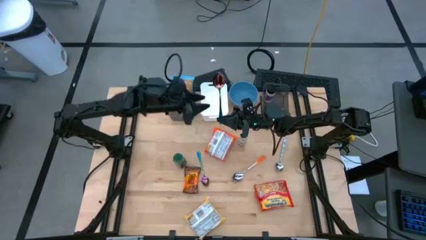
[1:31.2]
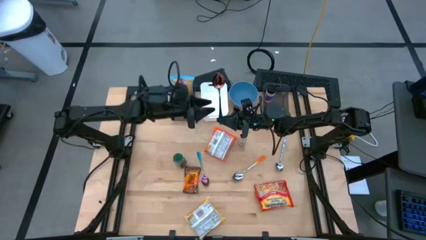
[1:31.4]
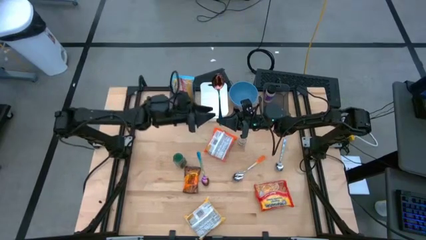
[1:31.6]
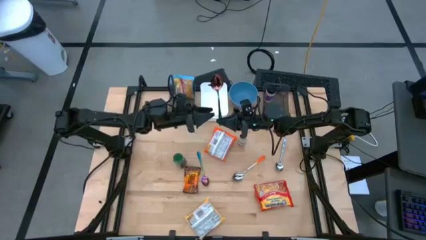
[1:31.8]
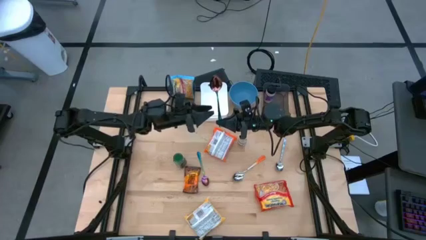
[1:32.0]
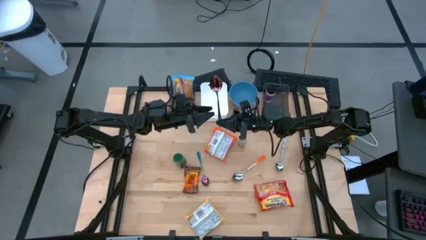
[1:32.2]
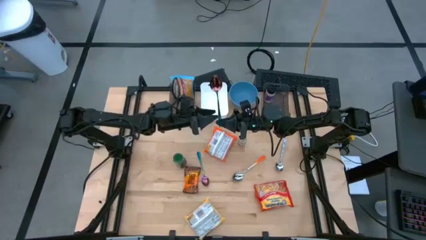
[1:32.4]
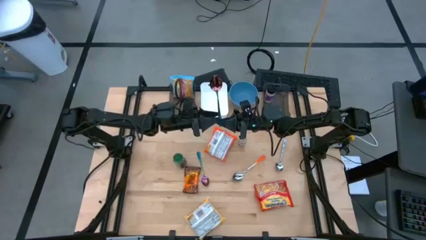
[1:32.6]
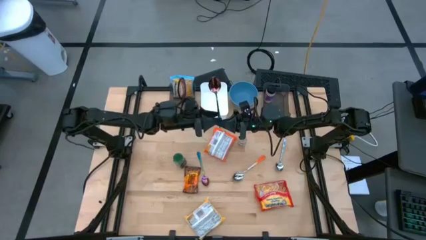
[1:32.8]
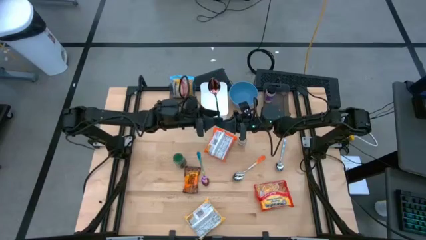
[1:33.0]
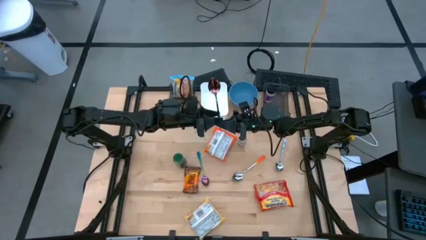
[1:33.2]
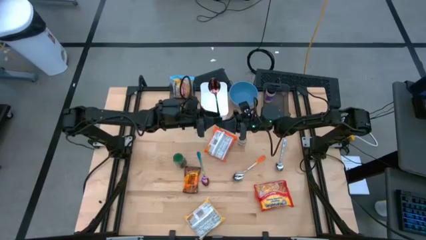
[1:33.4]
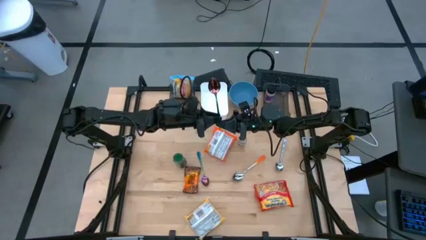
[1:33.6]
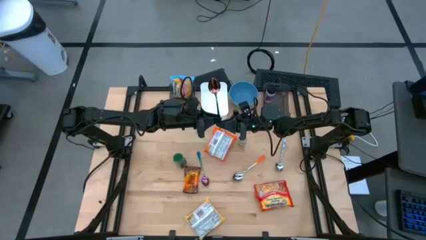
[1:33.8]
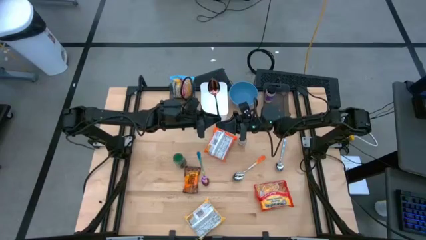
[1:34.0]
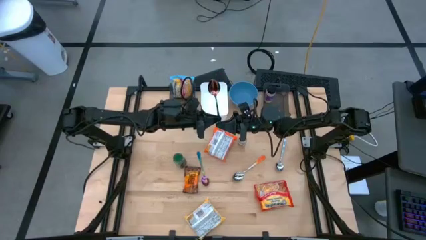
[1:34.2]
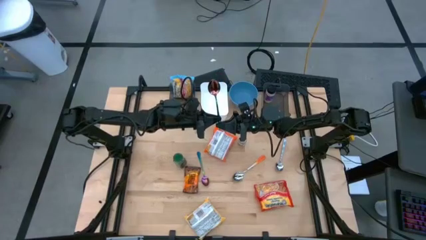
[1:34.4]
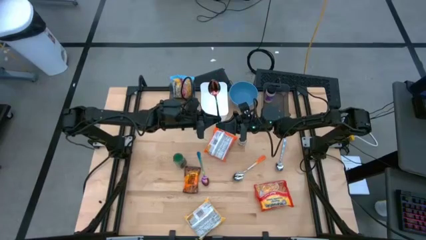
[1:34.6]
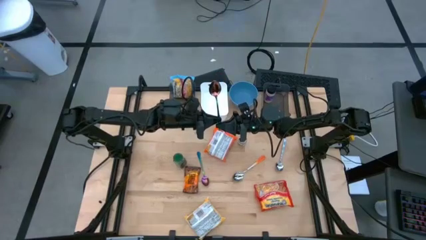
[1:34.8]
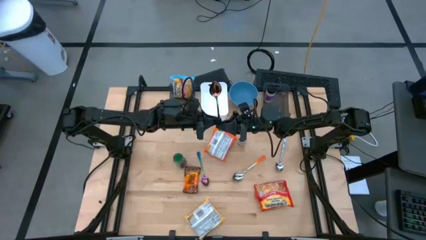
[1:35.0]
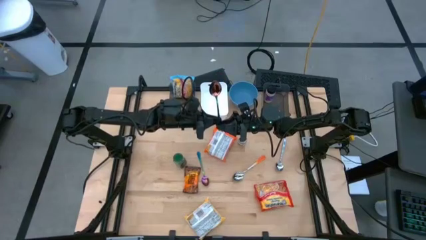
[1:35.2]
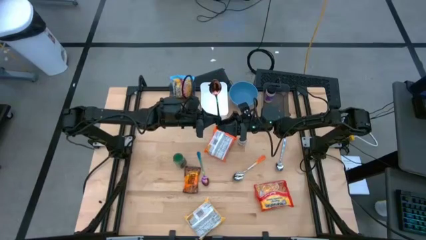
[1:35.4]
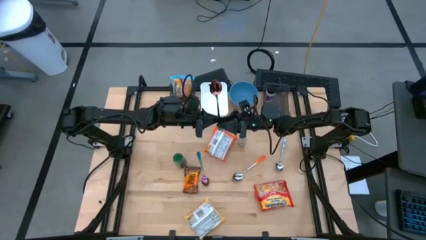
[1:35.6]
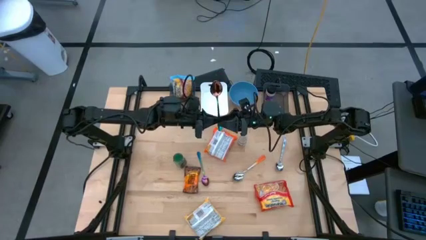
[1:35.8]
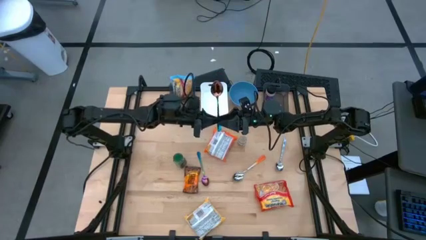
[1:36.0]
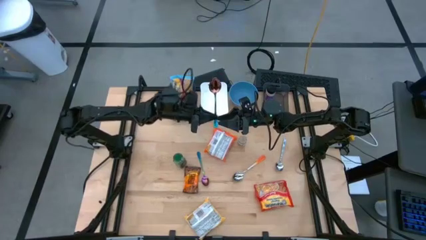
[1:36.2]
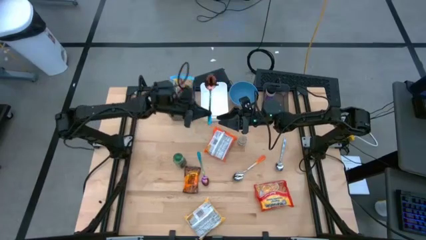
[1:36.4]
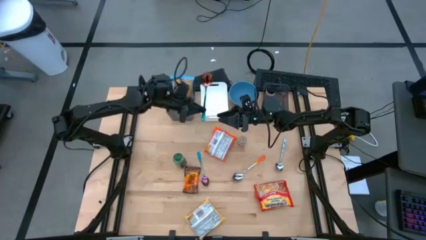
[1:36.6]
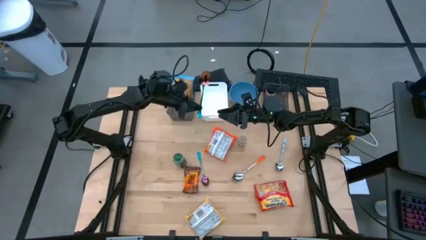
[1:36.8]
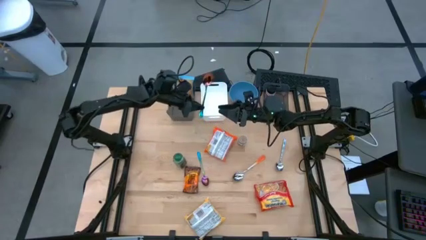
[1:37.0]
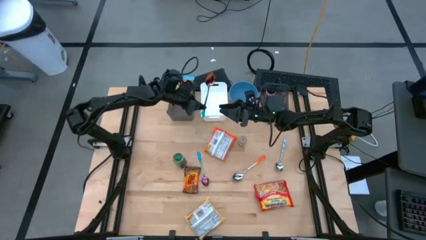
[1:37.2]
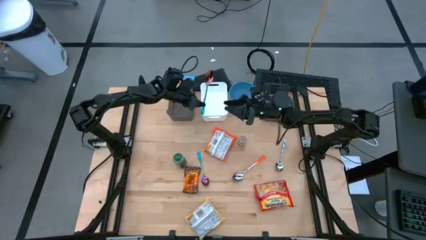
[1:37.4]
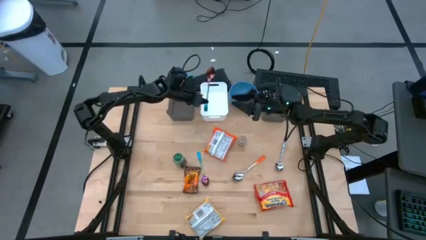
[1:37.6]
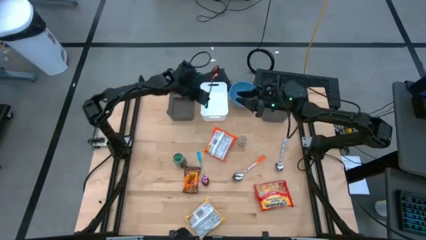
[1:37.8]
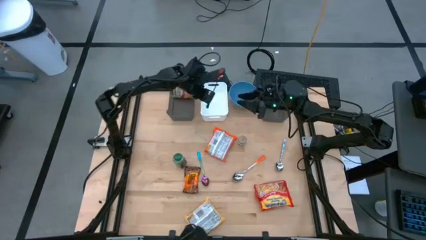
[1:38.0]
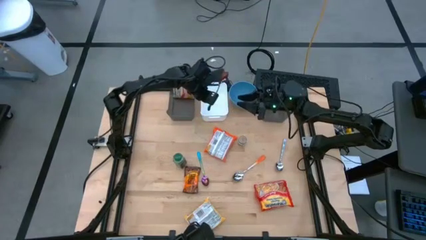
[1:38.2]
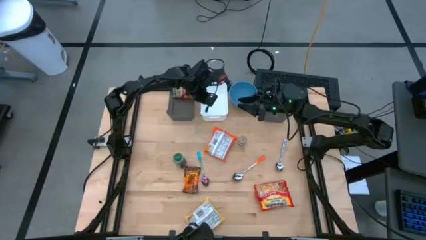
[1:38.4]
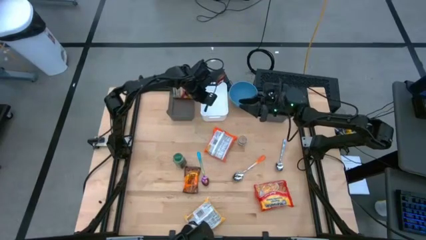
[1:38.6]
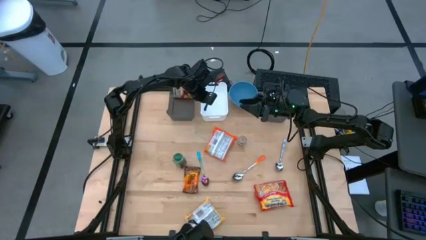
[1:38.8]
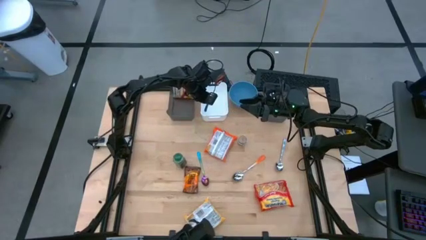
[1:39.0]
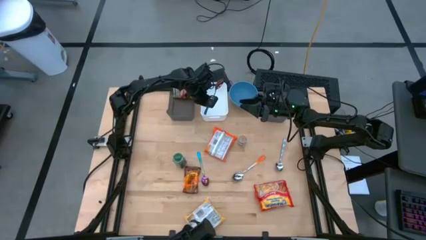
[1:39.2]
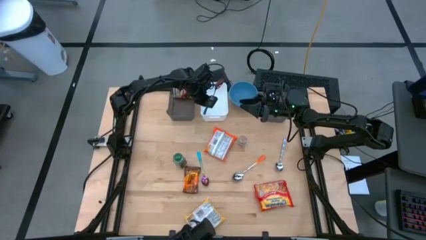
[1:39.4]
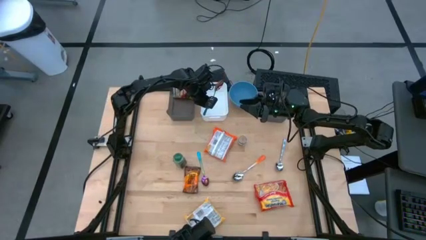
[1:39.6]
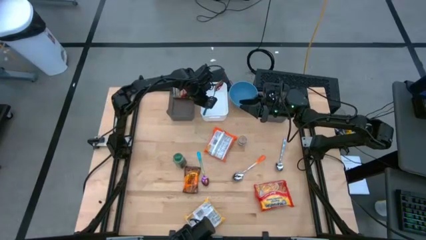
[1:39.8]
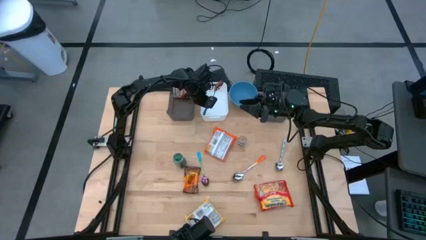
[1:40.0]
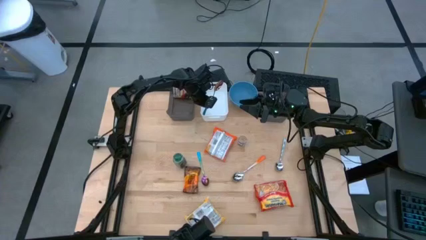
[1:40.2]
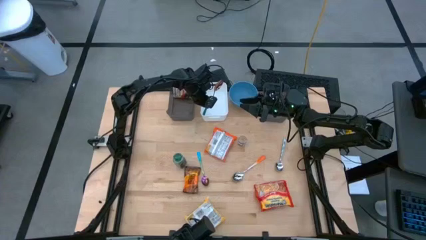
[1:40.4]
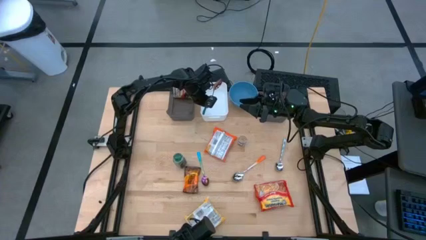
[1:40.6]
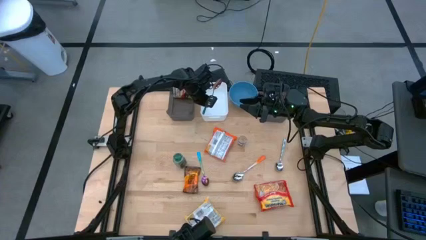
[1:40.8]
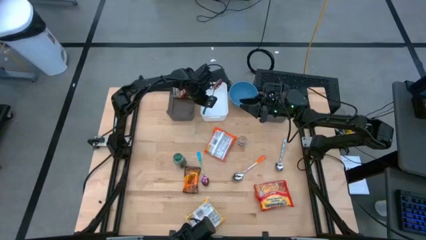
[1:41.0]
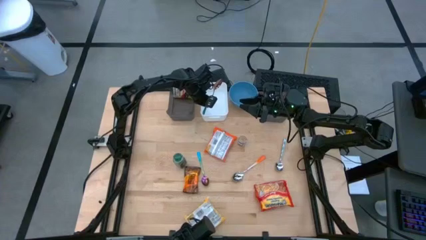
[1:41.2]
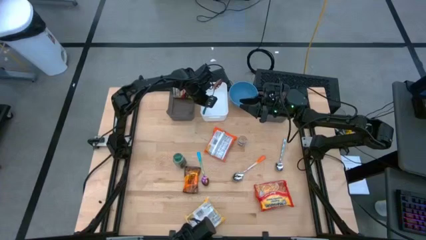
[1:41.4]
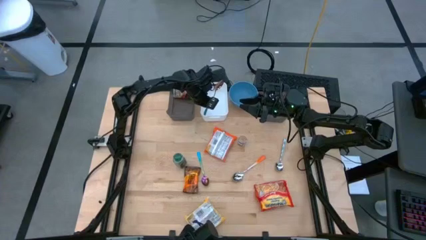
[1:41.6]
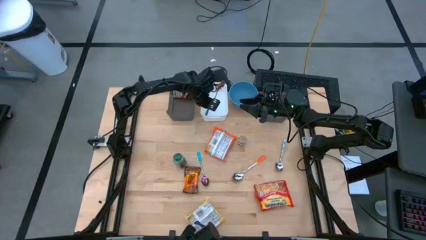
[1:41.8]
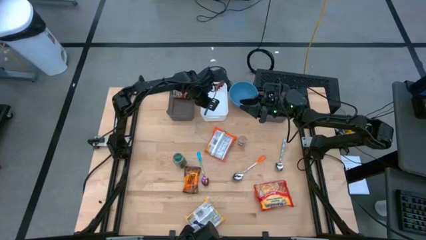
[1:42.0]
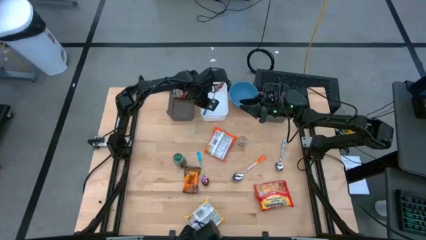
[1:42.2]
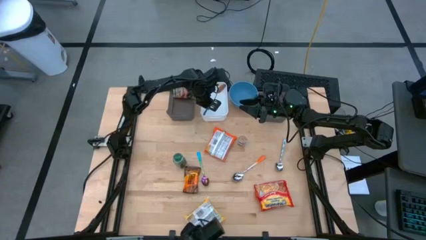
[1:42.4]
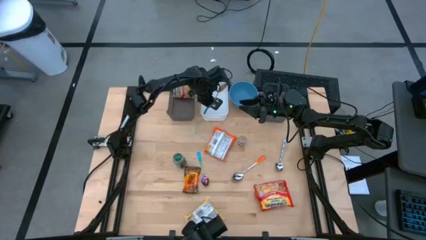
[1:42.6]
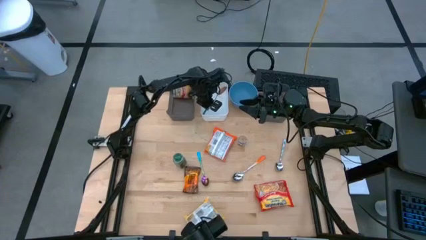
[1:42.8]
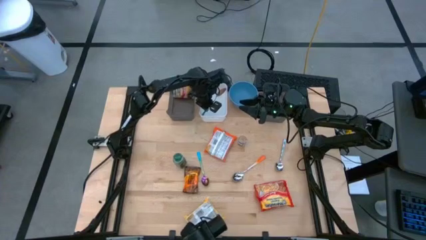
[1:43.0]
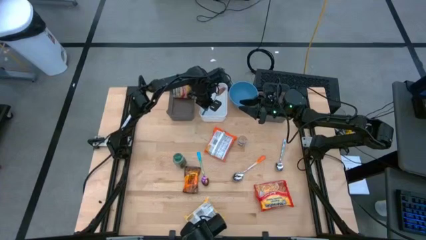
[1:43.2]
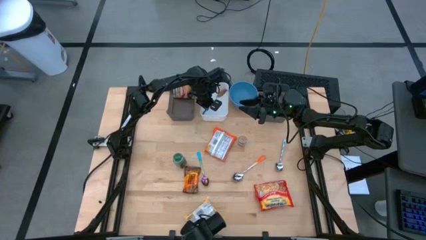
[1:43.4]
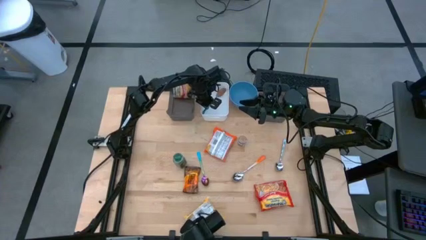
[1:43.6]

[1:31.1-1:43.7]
Task: Pick & Place Food Item
Put the left blue spoon into the white bin

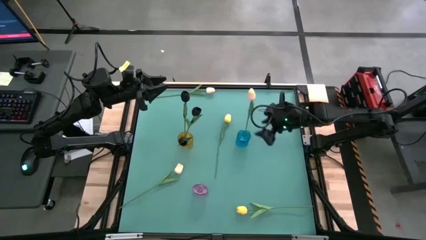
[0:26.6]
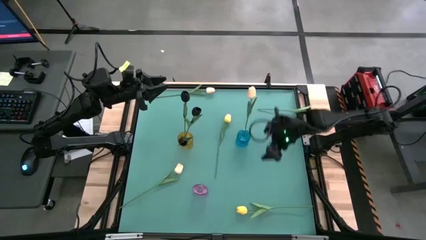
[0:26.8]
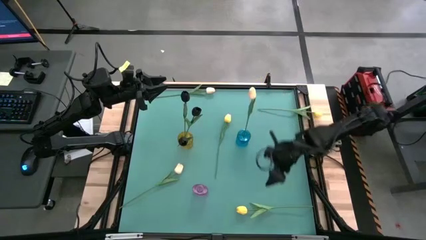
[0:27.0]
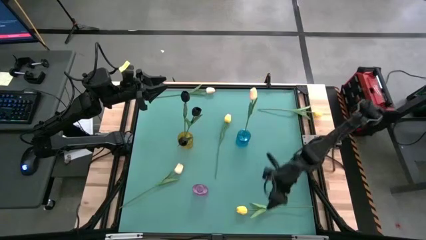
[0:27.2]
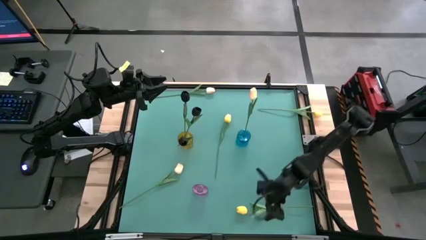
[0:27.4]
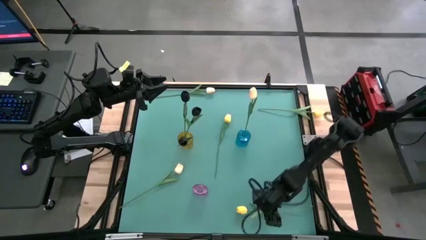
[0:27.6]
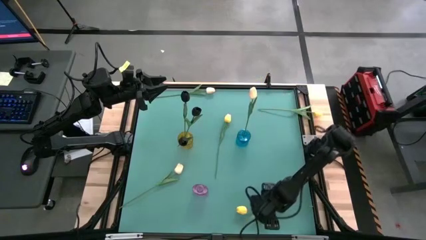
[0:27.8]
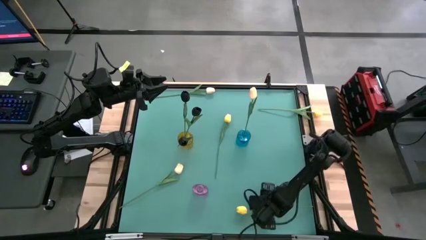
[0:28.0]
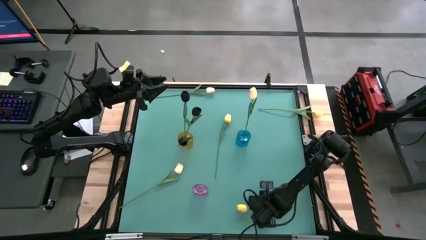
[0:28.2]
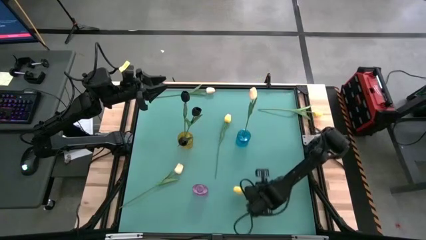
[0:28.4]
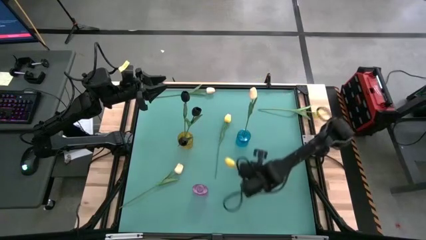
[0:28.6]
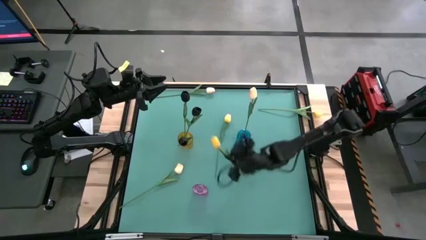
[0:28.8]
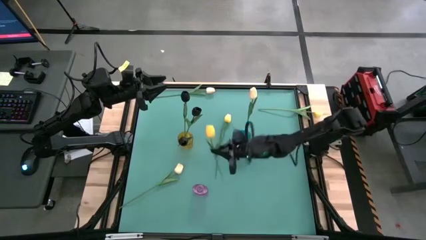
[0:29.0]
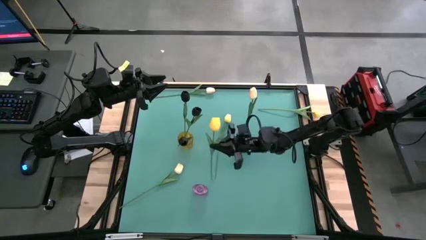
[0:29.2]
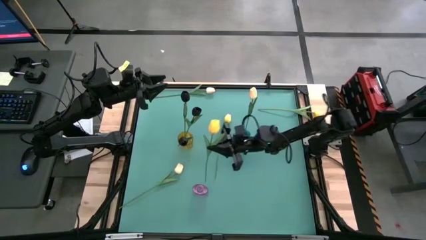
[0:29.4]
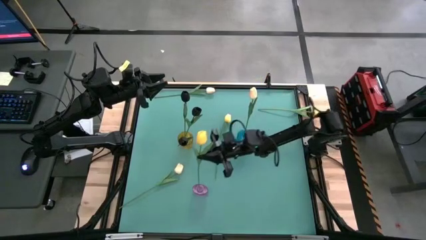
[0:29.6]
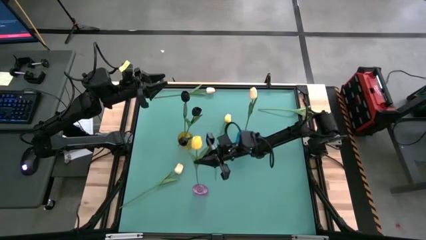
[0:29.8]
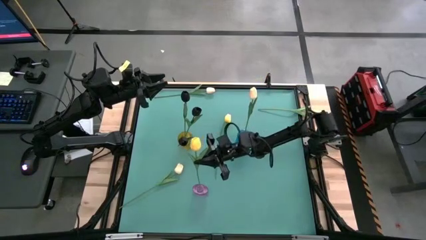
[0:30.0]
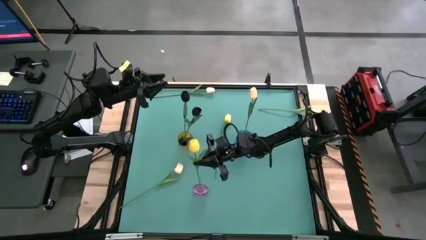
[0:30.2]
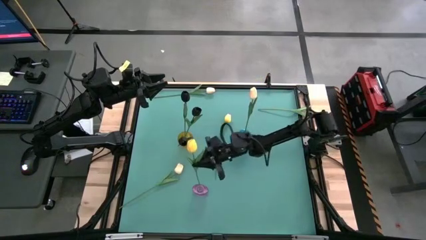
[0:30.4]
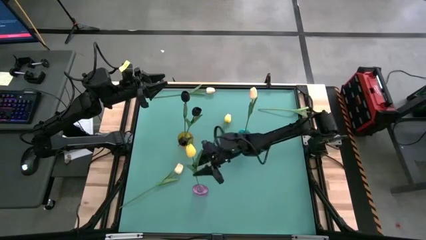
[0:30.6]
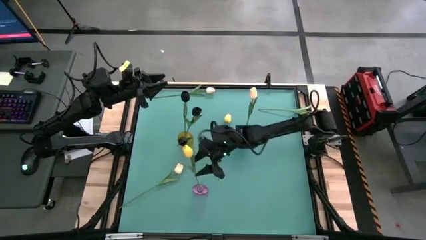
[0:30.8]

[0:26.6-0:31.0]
Task: Sort flowers into vase by color
Put the bottom right yellow tulip flower into the purple vase
